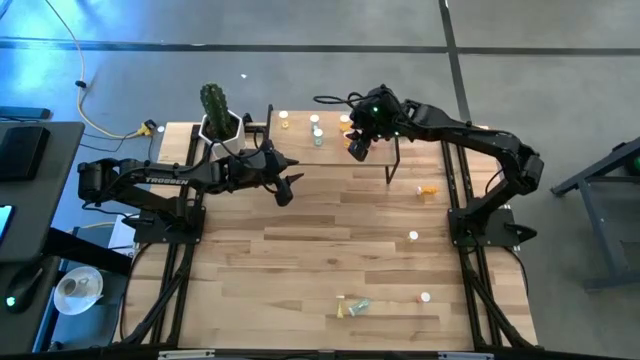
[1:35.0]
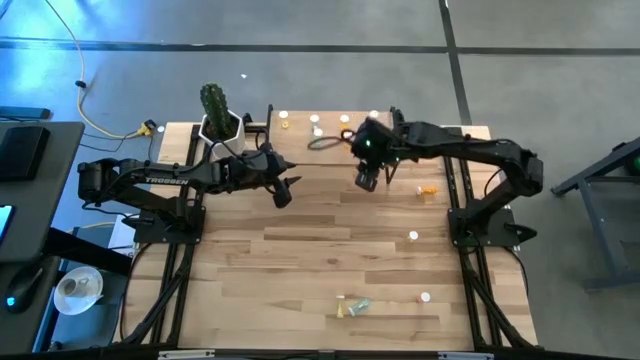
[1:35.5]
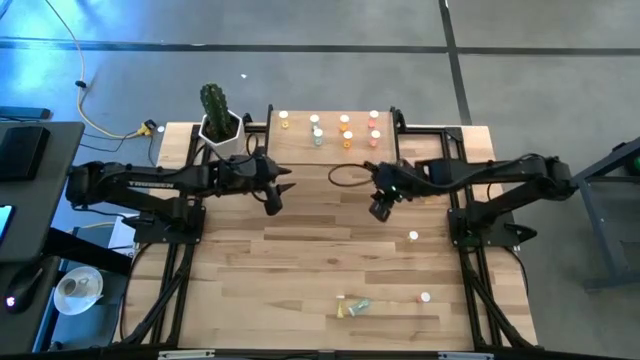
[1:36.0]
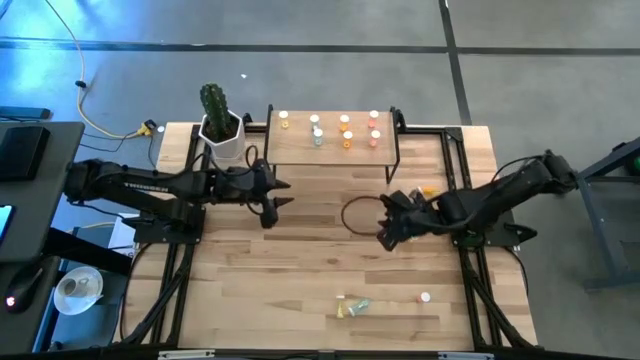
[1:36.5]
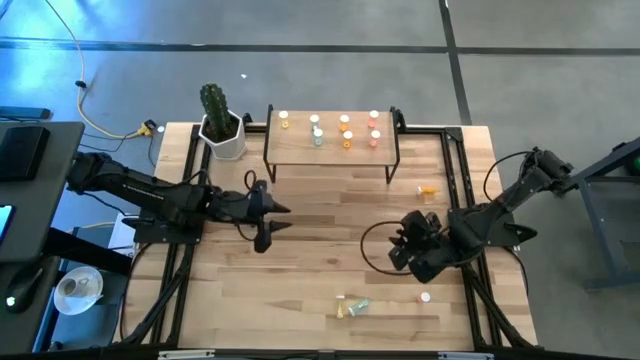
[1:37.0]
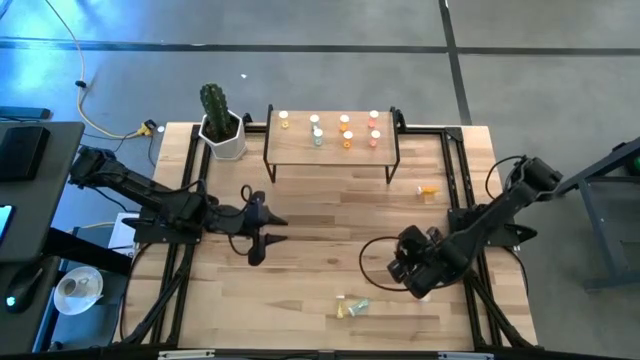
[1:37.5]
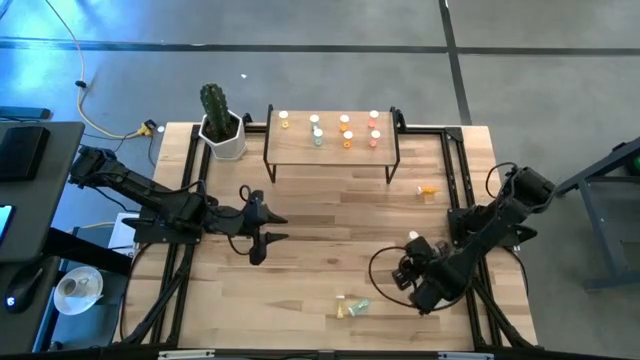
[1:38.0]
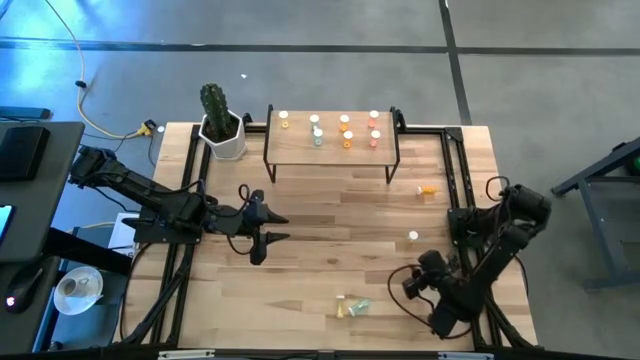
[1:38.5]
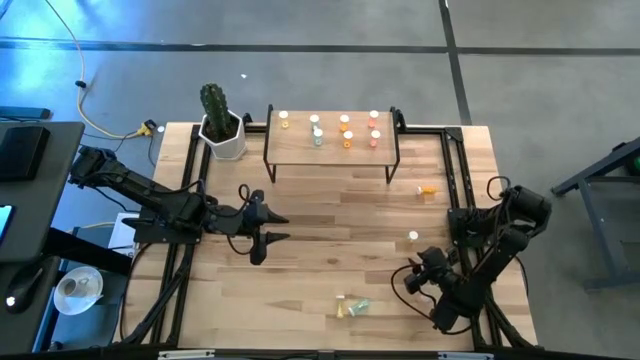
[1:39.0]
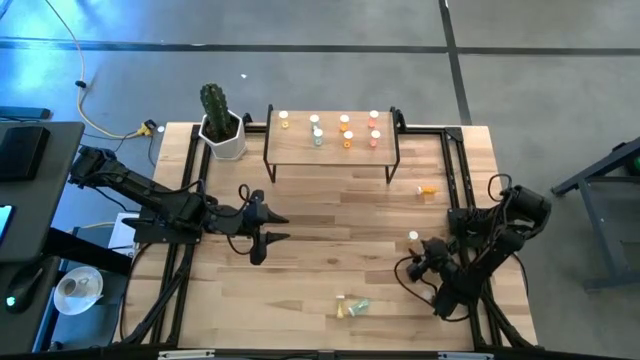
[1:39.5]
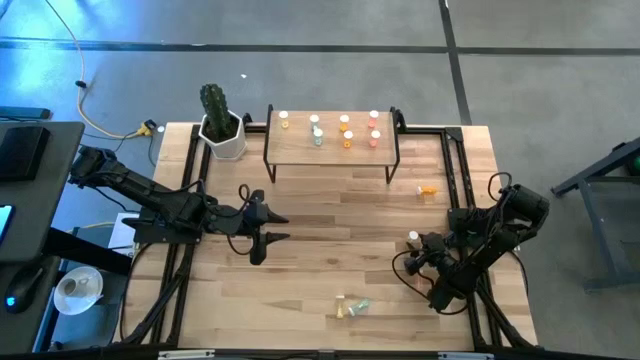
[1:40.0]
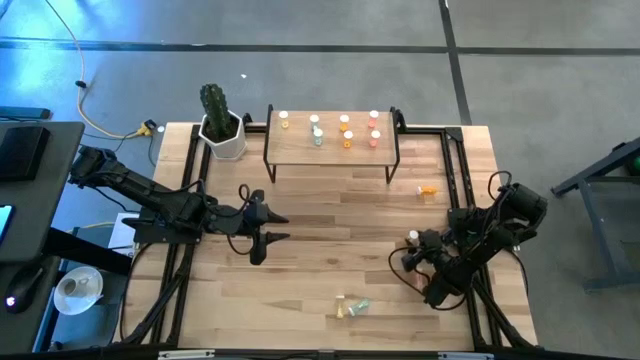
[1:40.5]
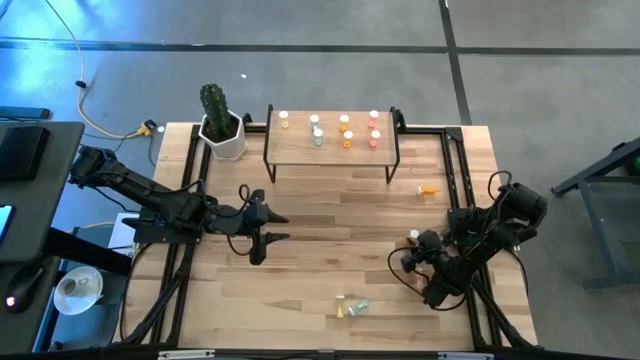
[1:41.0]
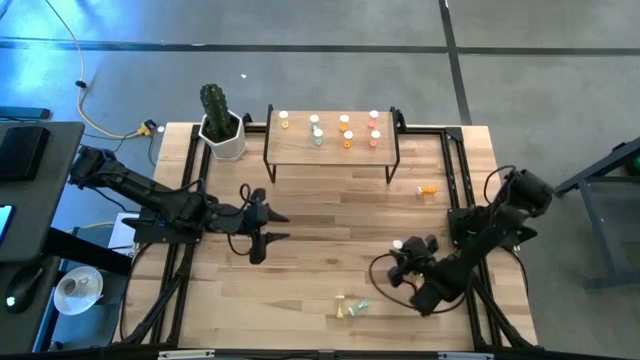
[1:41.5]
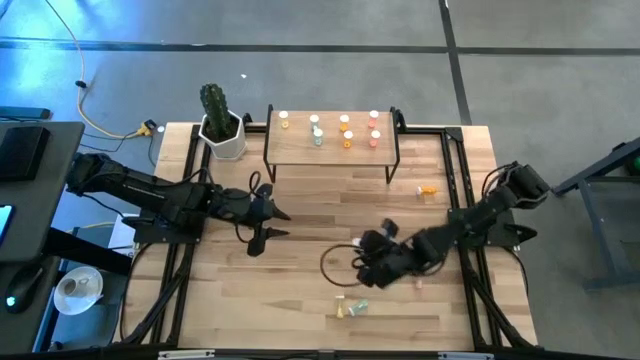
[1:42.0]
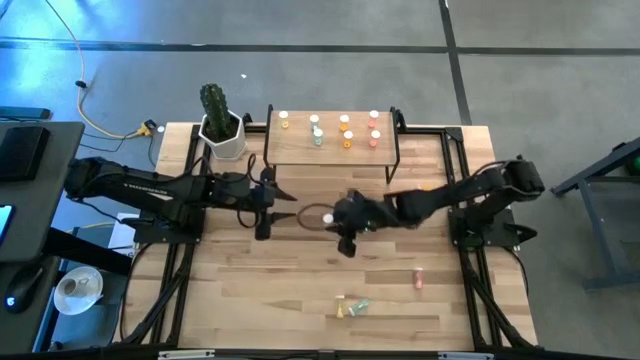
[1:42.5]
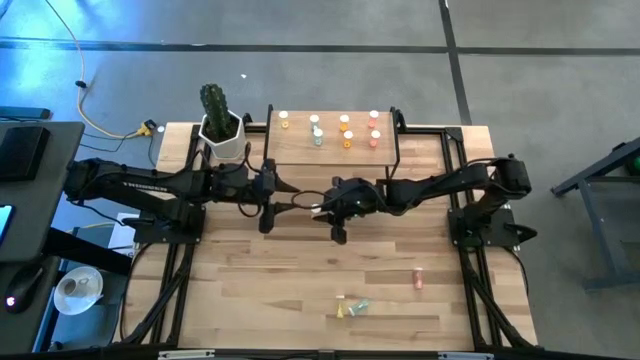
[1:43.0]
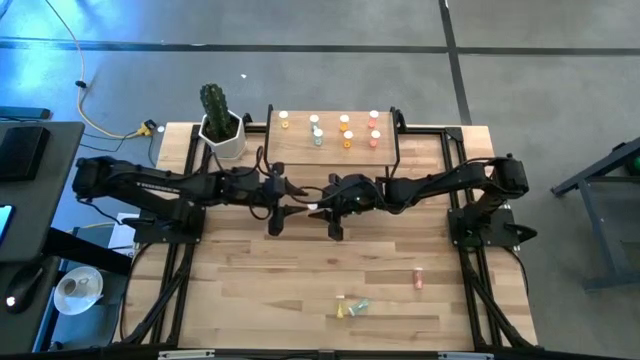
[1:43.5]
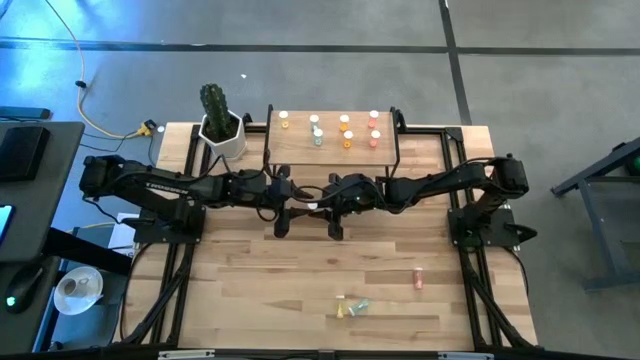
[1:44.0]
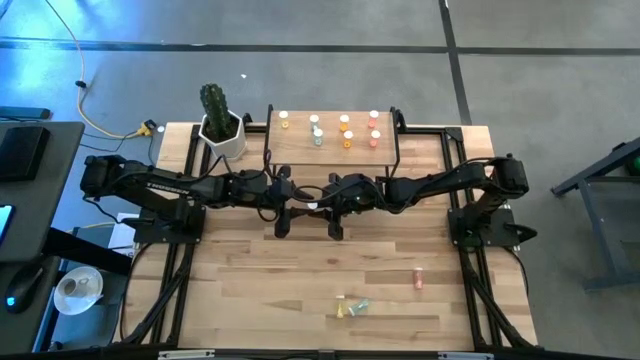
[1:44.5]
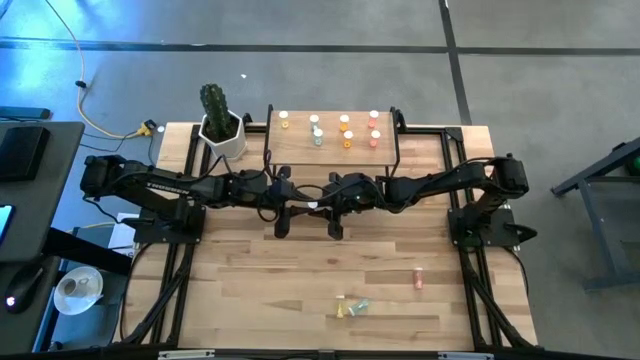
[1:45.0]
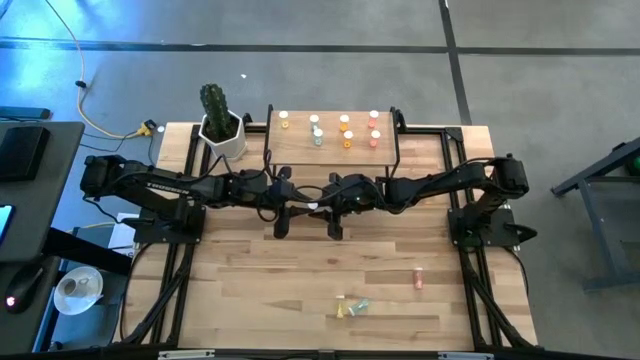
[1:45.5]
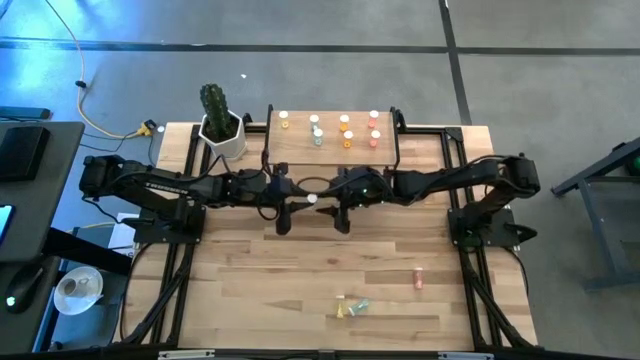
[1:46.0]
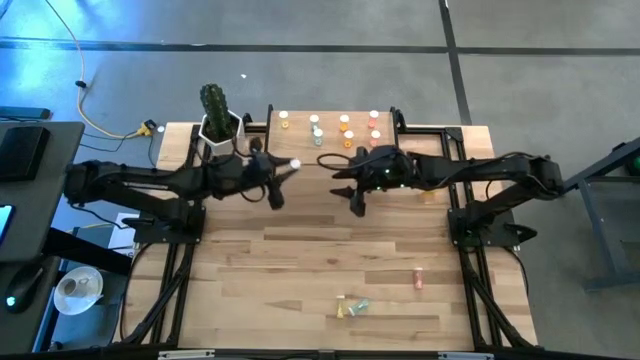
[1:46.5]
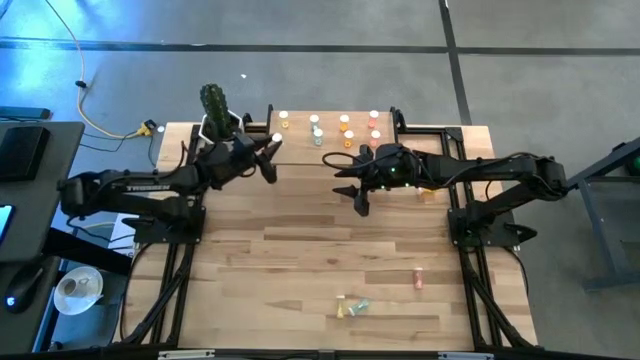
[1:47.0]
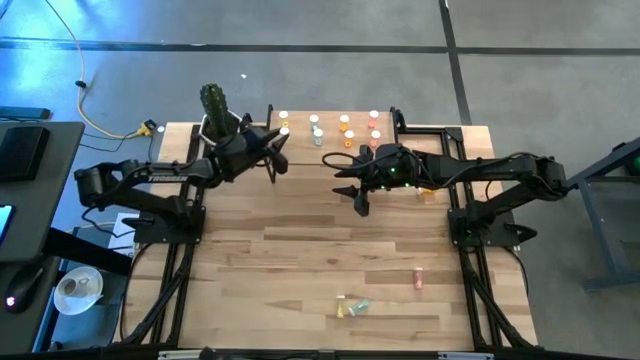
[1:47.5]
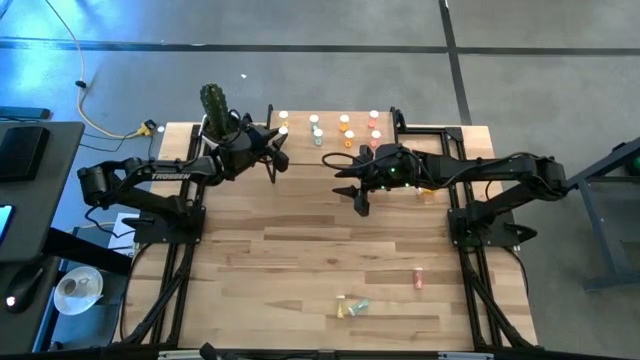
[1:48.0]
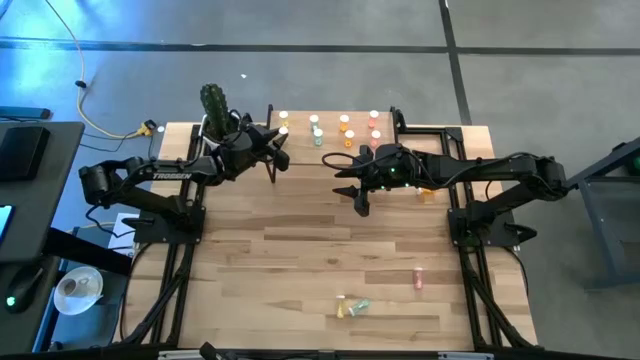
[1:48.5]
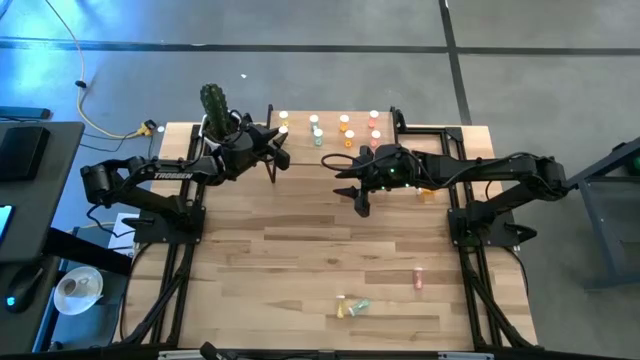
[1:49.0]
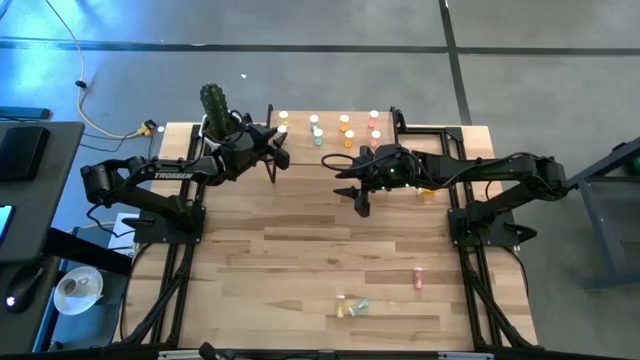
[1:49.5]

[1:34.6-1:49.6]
Task: Pick and place medicine bottles onto shelf by color
Put the top yellow pill bottle on the shelf aligned with the other yellow pill bottle

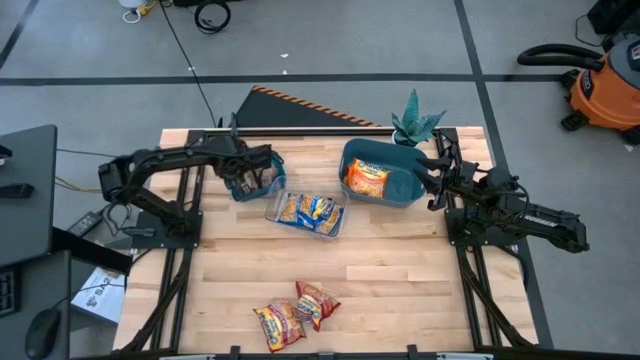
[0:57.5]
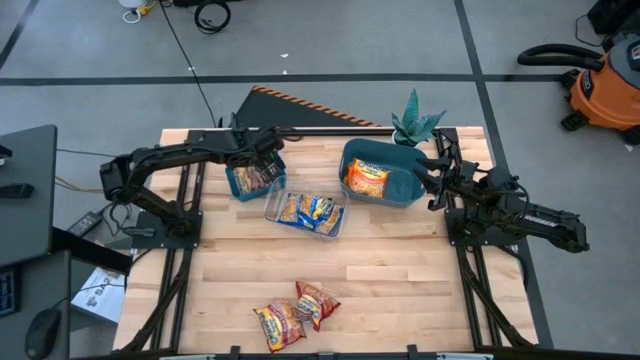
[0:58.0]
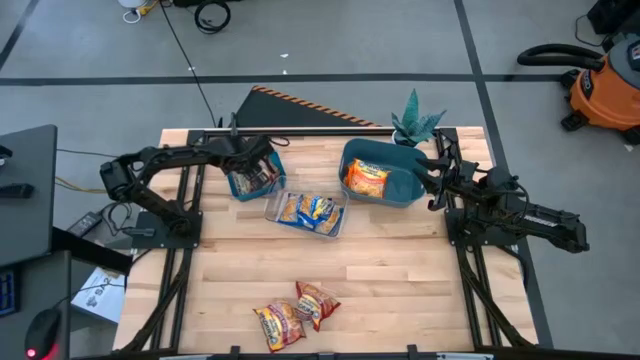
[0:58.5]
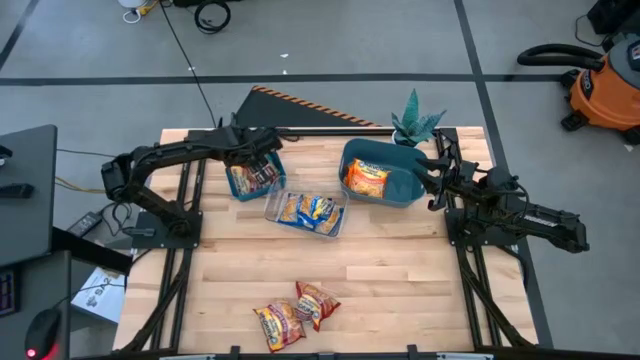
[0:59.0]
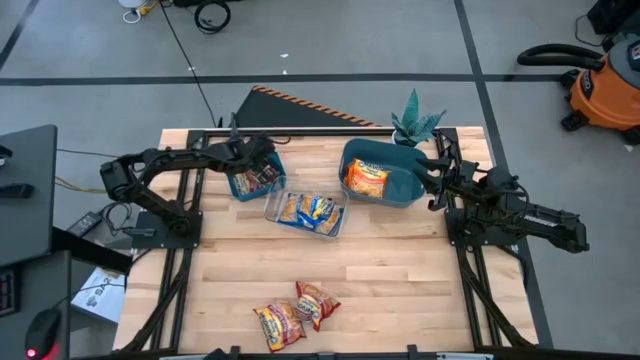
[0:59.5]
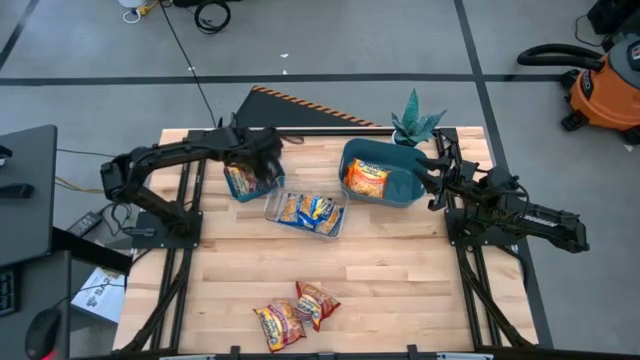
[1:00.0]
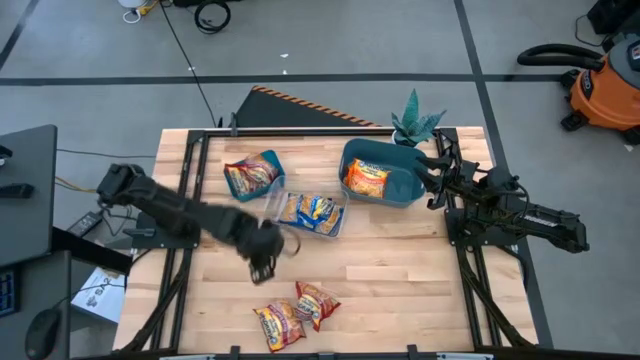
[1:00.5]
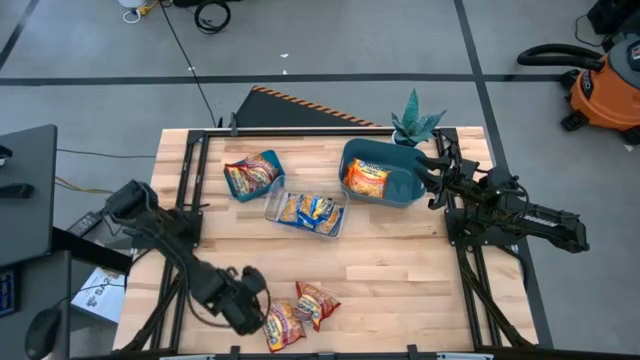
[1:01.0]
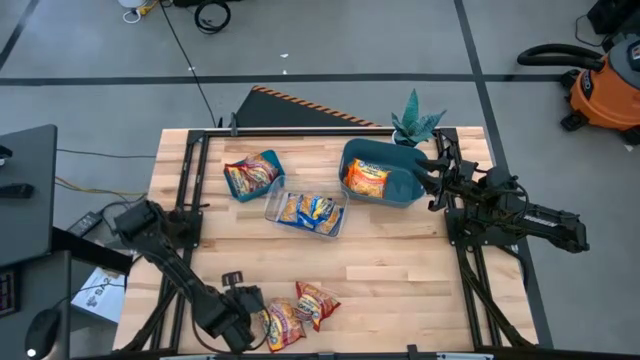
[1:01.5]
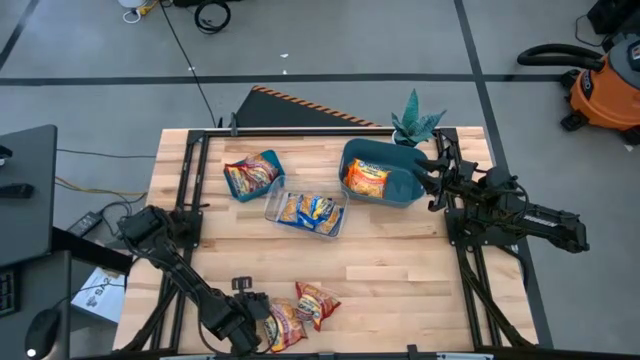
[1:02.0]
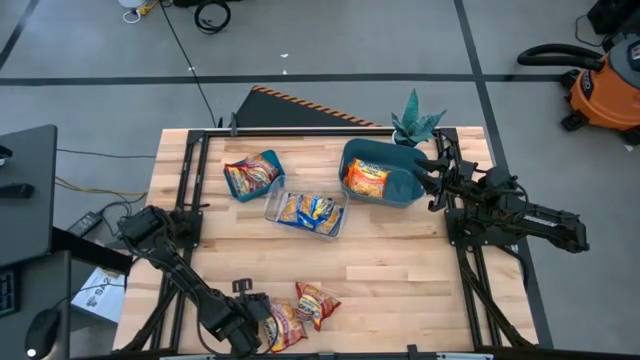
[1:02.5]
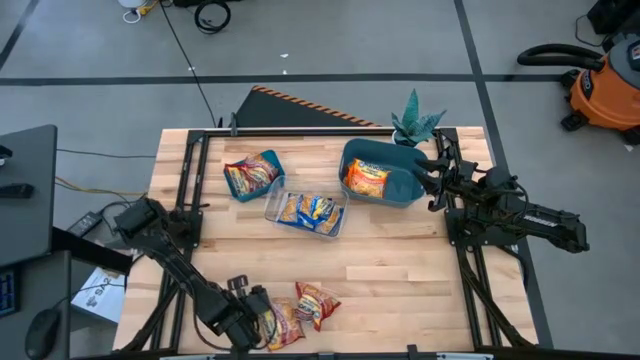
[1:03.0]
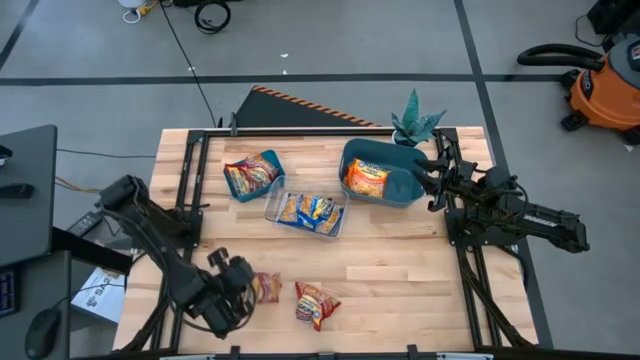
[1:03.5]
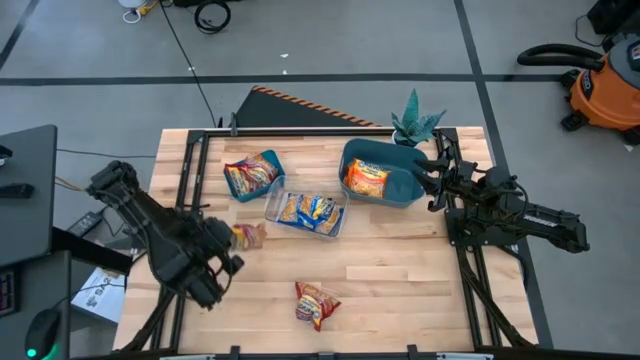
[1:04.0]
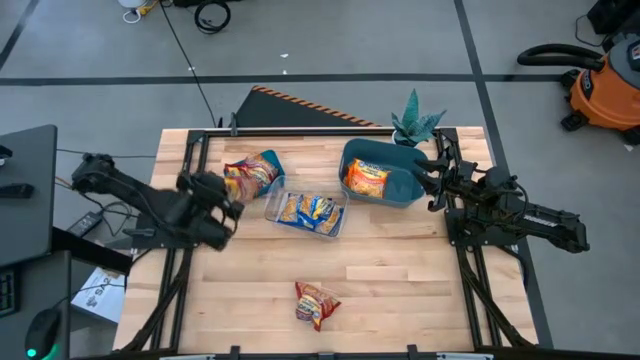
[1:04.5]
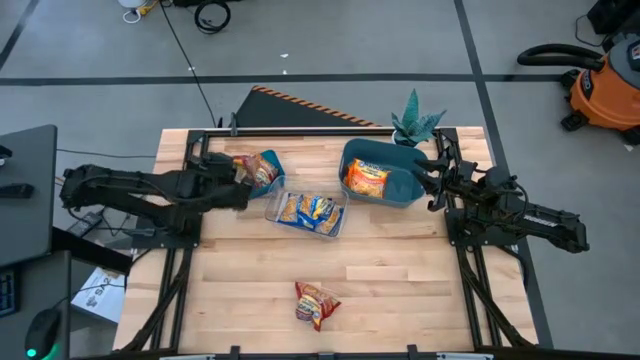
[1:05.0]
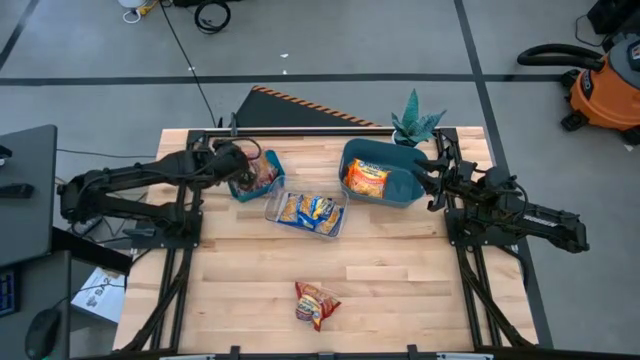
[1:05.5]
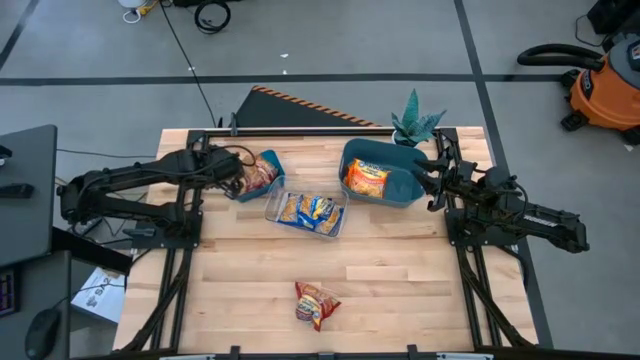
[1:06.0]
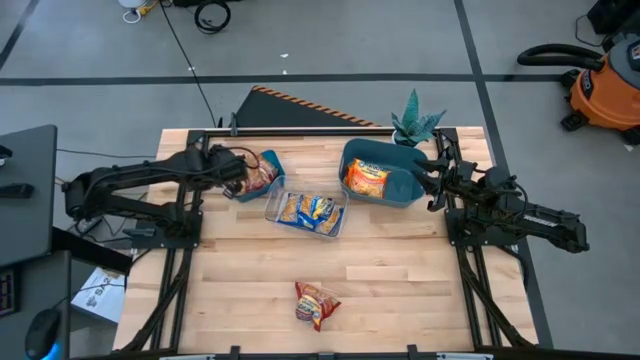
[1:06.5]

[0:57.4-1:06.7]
Task: Sort Maruchan noodles
Put the red noodle pack into the left small blue bin
